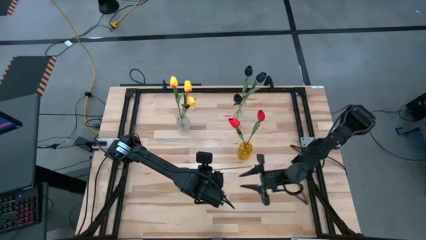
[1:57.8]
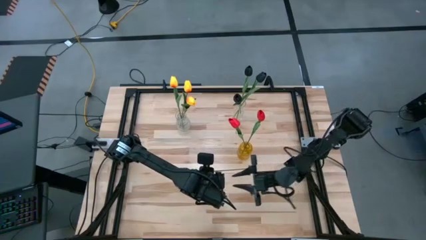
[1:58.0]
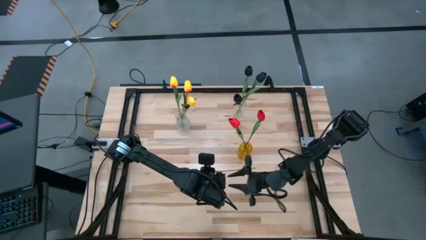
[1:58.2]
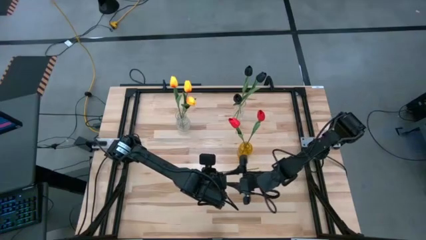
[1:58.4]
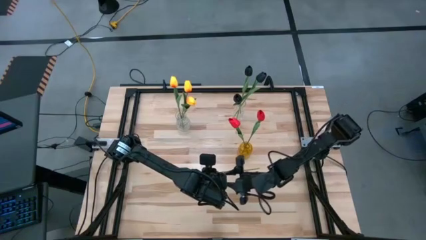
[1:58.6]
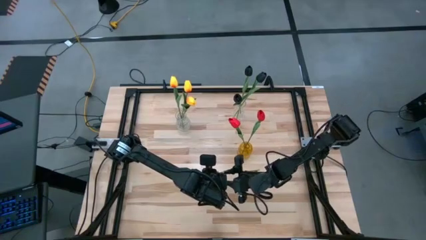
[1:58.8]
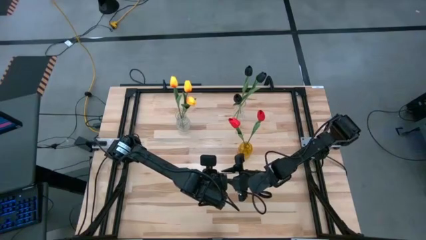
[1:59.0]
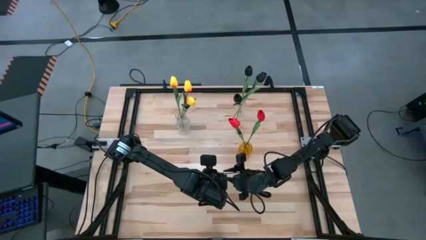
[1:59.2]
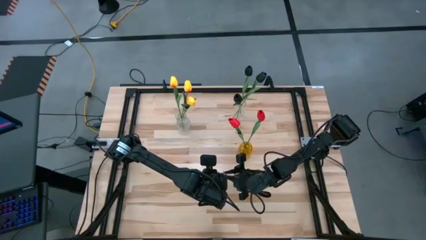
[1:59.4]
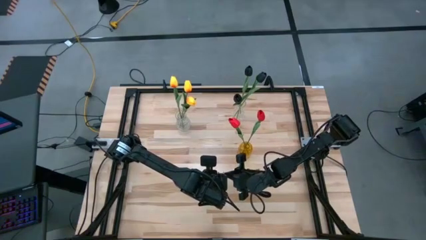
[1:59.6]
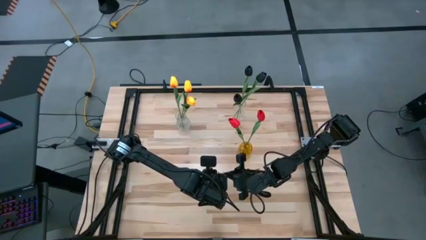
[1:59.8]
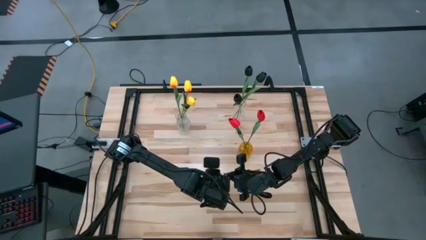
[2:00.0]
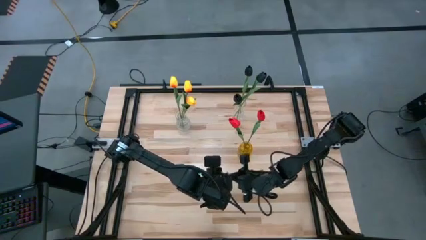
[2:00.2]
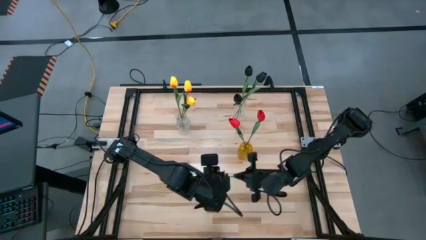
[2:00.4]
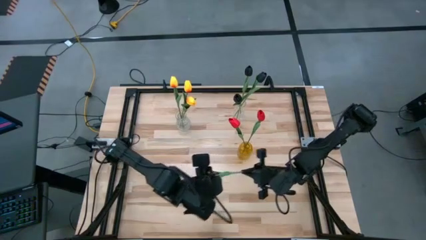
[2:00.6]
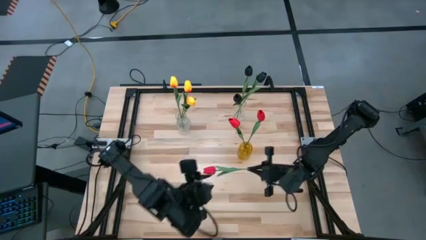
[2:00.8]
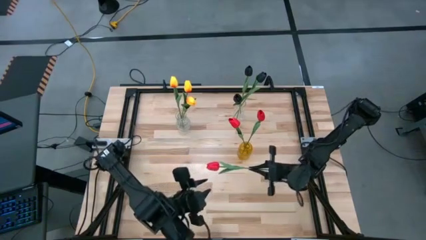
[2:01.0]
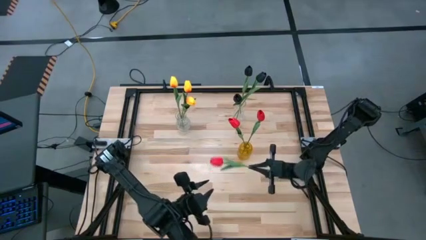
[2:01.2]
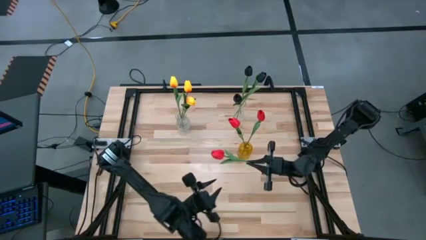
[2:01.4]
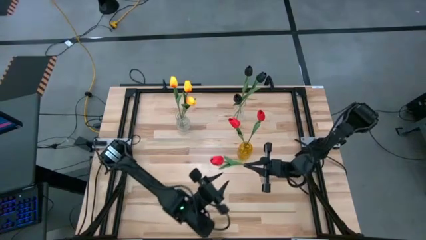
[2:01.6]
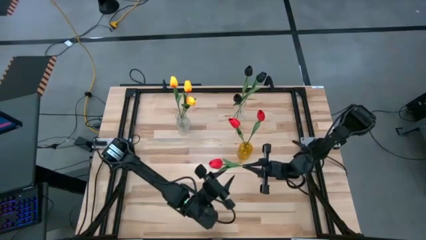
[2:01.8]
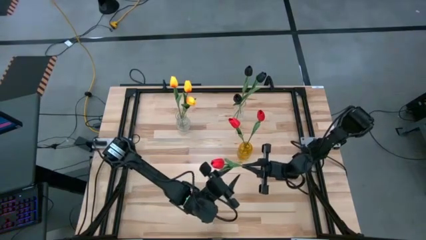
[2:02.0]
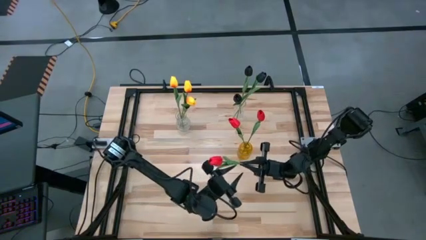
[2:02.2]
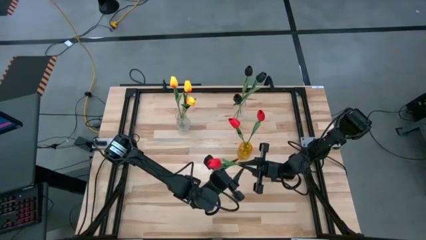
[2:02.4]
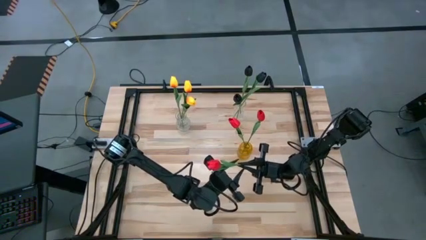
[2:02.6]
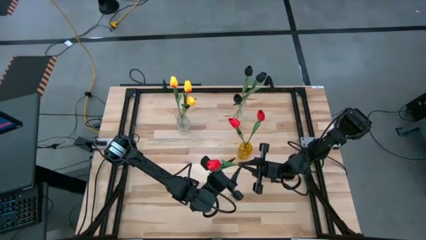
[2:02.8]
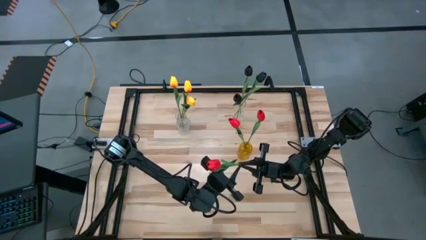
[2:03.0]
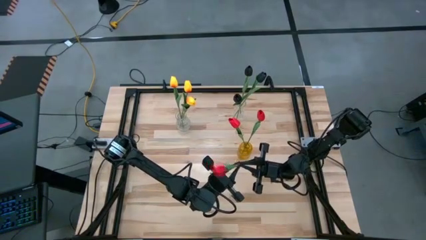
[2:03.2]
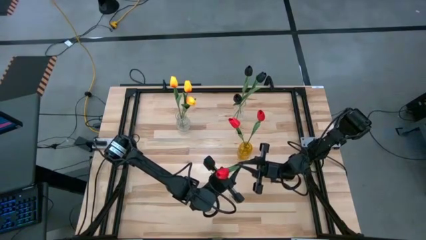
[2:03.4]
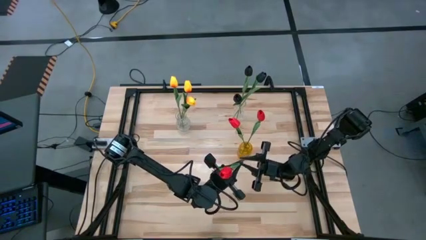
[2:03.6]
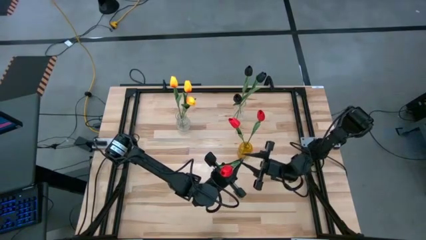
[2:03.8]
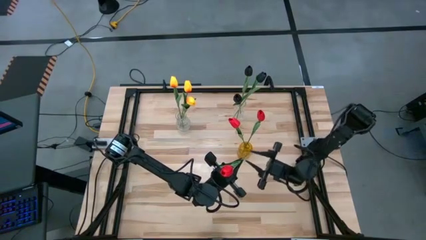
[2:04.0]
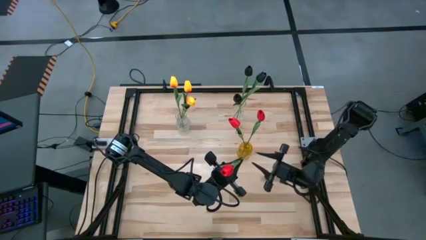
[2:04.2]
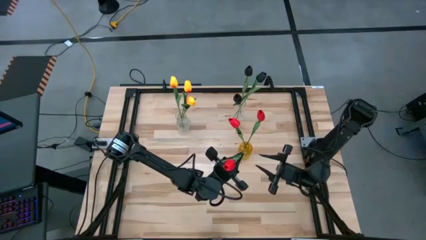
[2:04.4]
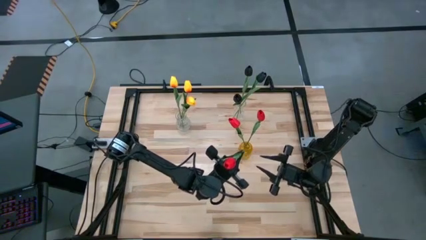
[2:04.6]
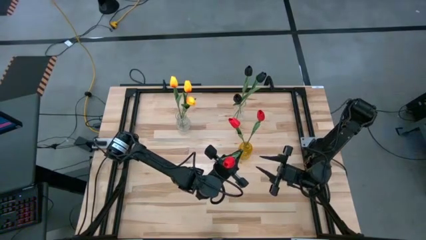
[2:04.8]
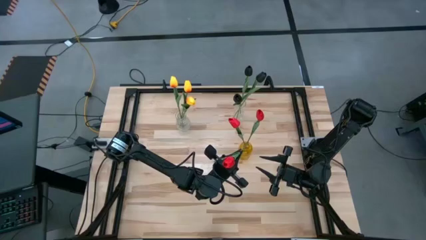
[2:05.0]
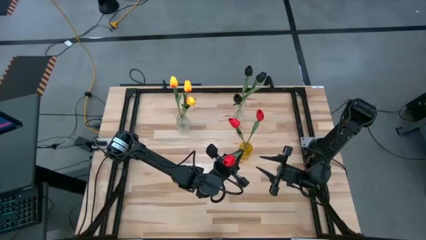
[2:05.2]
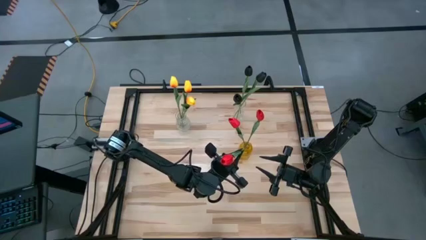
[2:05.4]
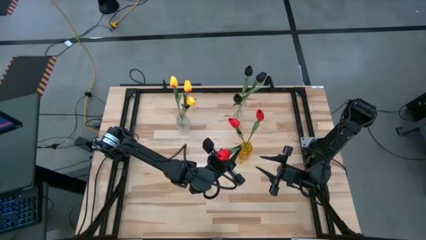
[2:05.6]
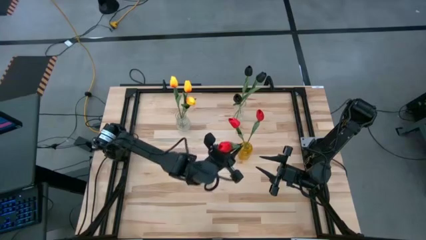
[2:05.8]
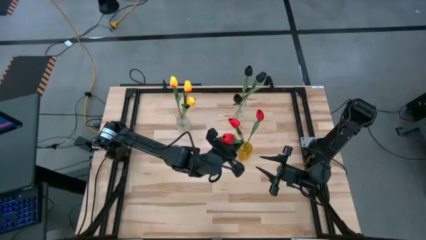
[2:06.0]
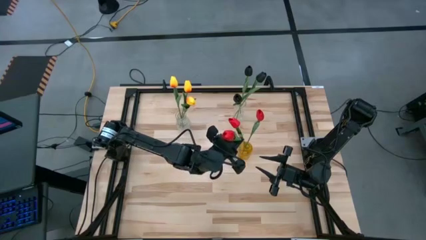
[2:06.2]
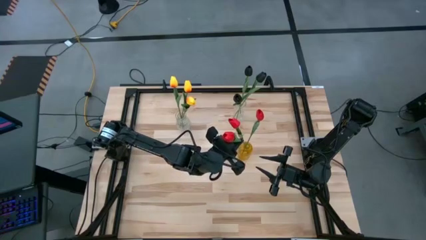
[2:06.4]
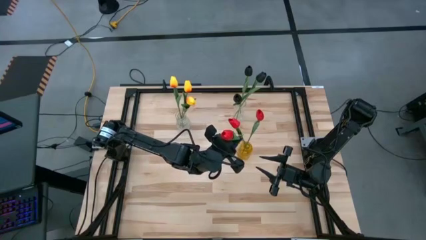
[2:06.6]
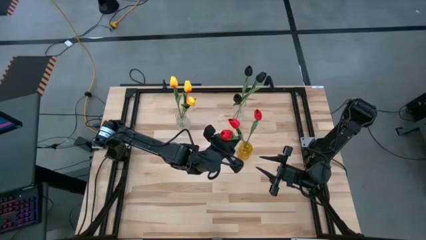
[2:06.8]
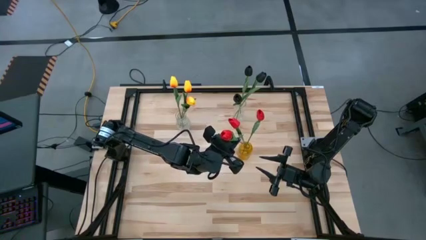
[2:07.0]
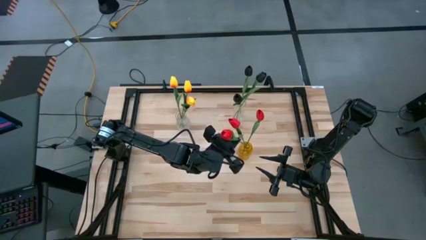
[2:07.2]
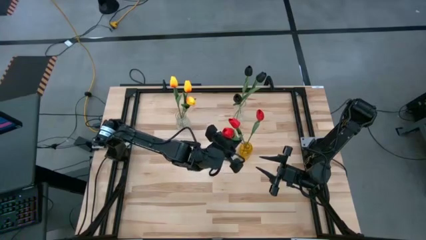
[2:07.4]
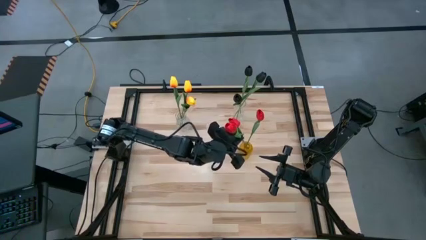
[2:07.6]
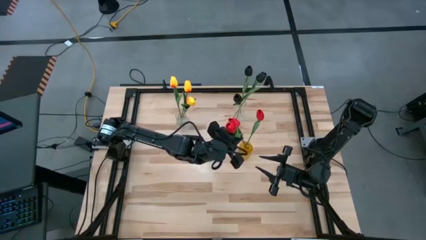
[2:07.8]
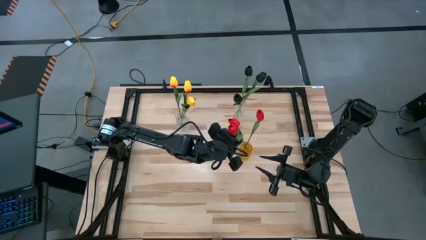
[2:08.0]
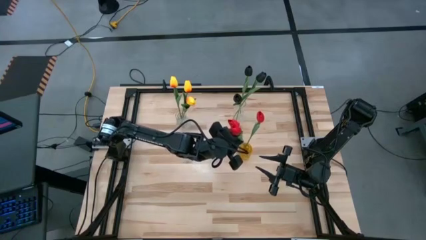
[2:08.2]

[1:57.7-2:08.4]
Task: Sort flowers into vase by color
Put the red tulip into the yellow vase

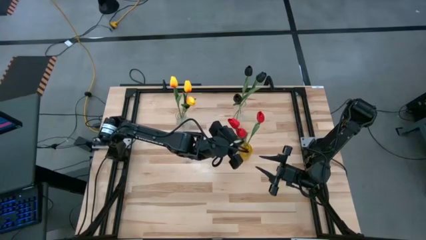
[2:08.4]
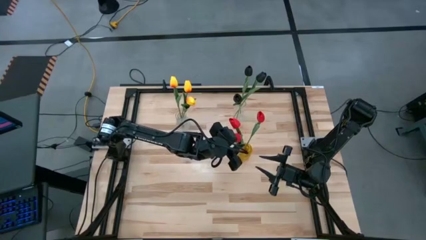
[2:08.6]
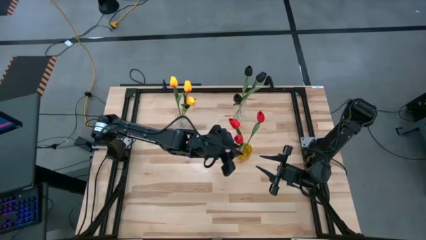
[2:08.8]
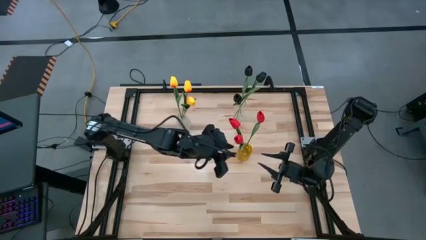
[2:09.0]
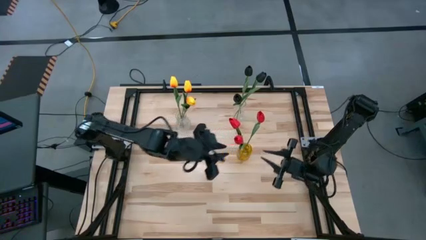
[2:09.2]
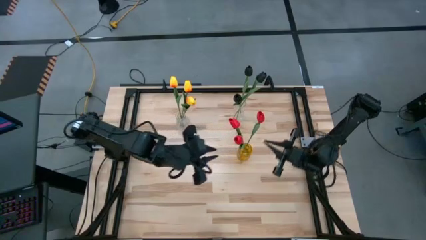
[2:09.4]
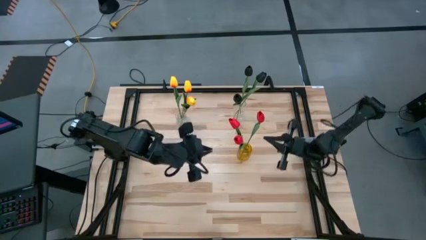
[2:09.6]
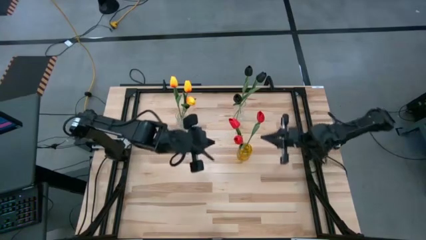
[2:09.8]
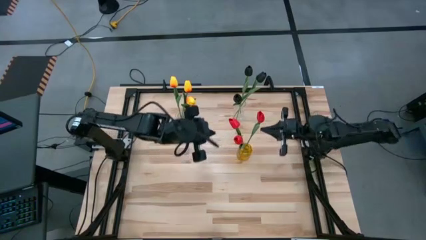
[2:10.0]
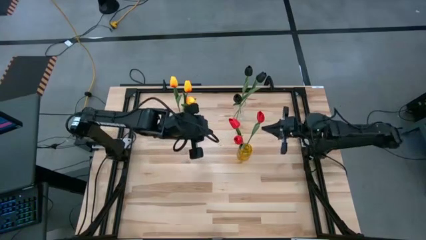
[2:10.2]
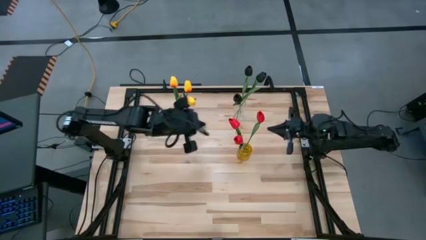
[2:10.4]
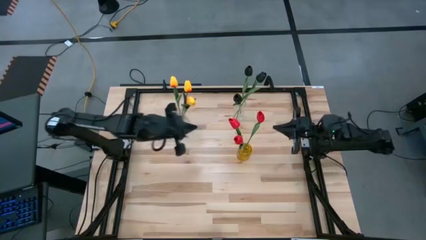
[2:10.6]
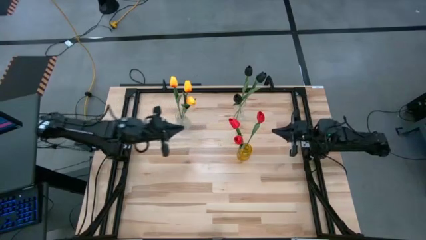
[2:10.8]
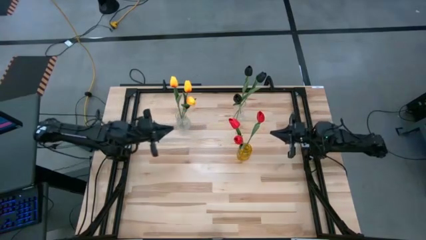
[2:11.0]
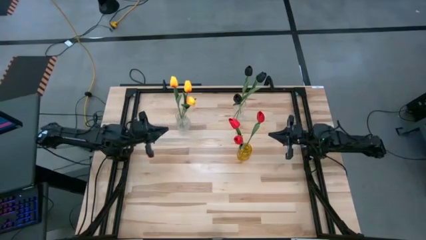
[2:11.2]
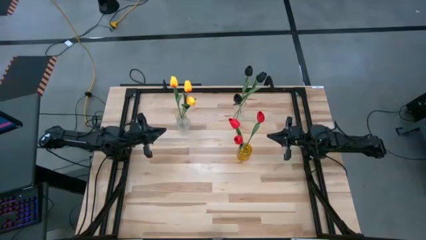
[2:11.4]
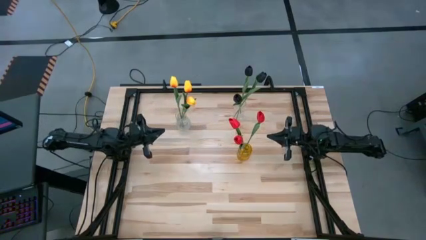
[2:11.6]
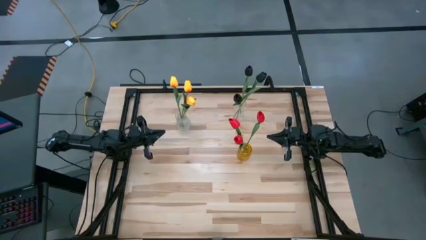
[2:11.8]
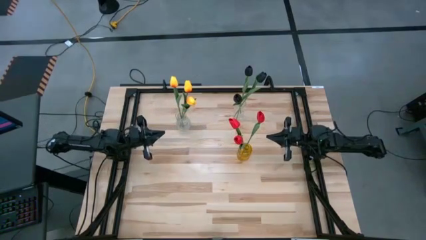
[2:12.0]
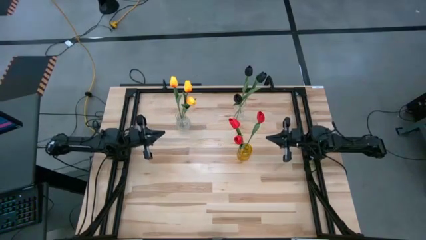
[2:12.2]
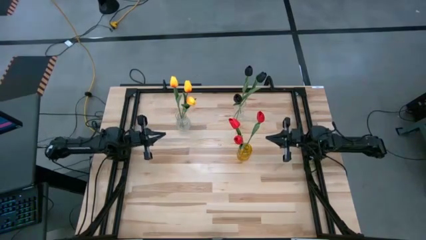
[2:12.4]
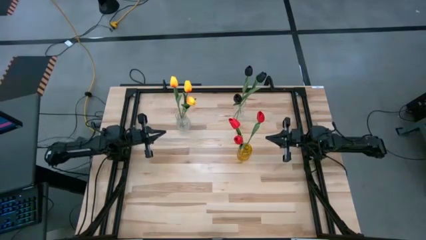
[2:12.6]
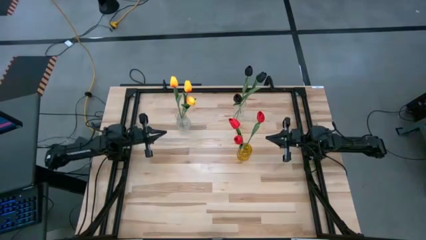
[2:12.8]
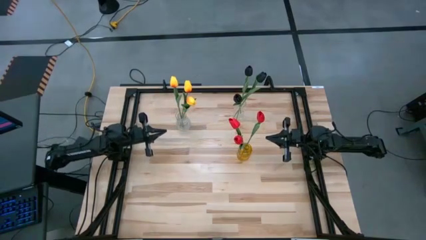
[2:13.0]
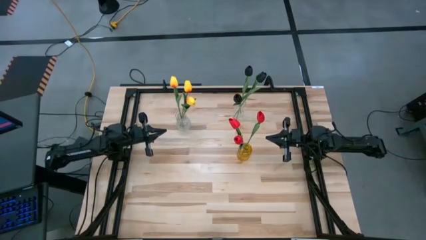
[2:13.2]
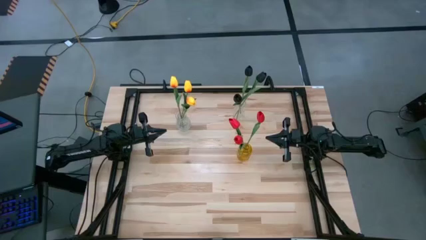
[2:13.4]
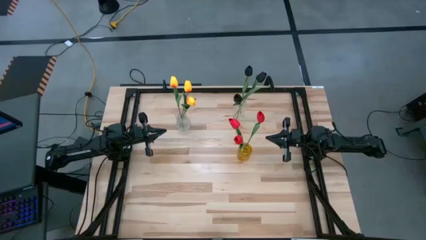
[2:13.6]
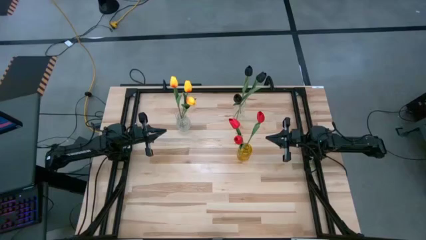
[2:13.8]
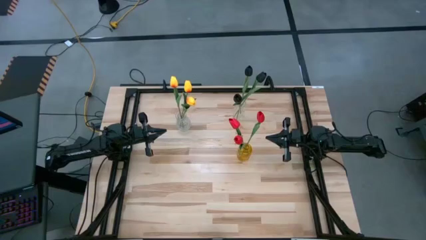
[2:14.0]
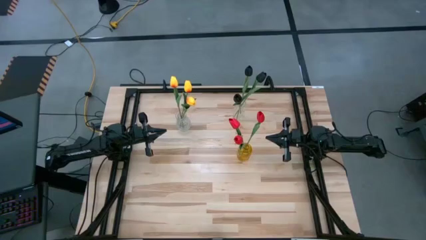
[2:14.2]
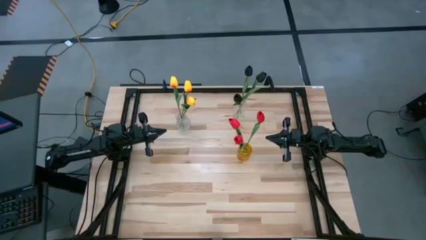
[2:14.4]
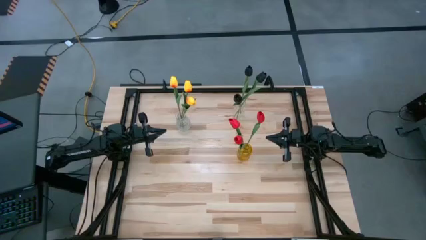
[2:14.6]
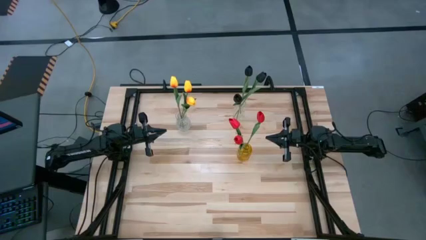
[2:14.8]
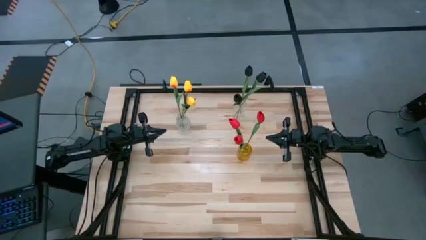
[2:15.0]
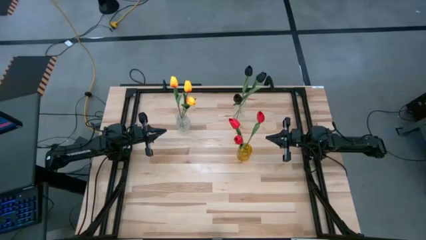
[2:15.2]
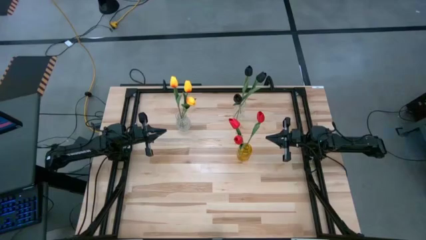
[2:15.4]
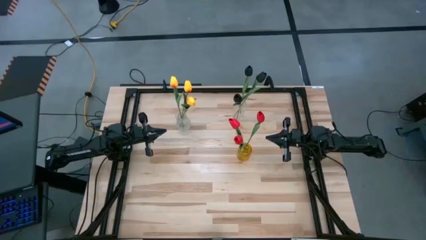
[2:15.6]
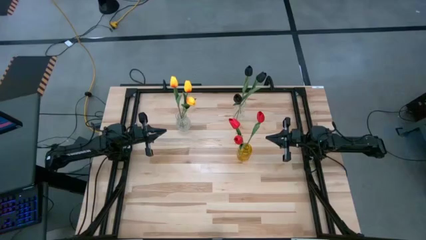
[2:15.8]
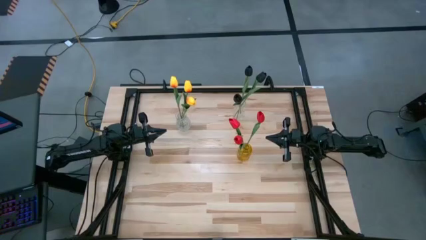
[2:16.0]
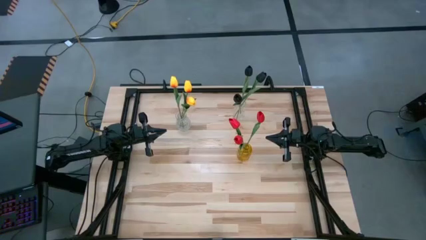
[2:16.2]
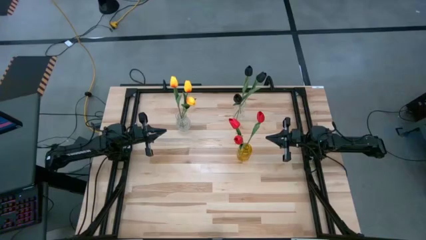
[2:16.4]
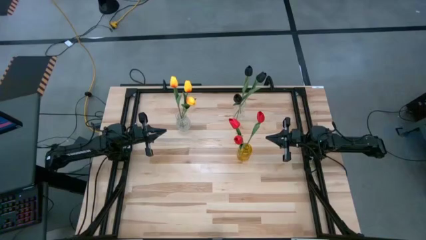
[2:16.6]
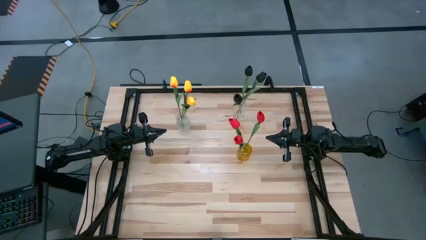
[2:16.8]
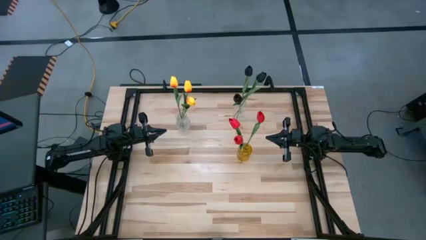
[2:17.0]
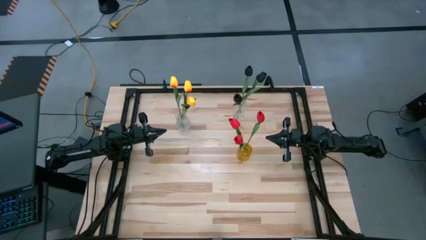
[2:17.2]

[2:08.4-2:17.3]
Return to Home Position
